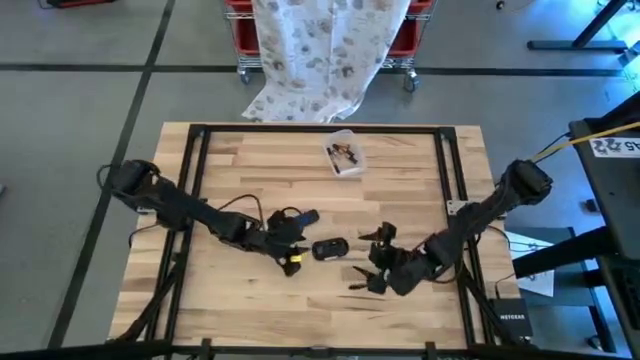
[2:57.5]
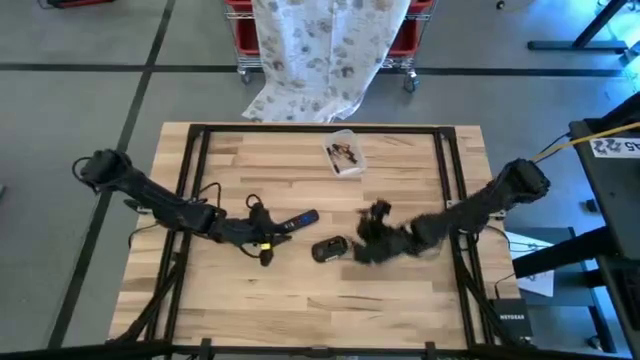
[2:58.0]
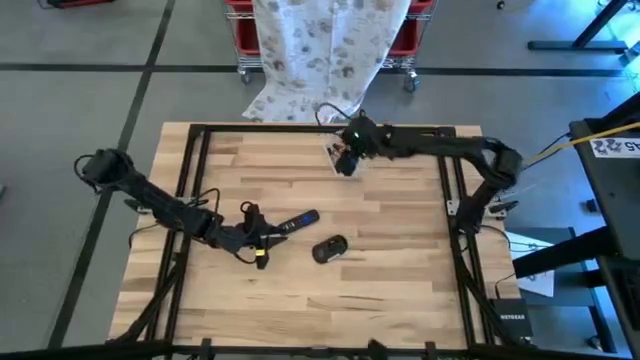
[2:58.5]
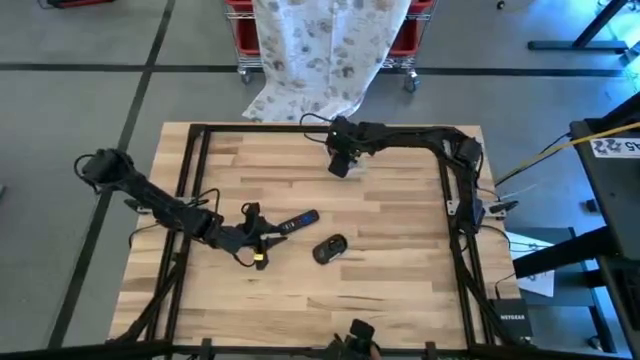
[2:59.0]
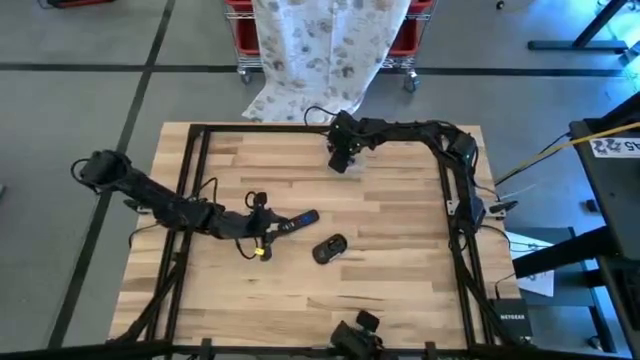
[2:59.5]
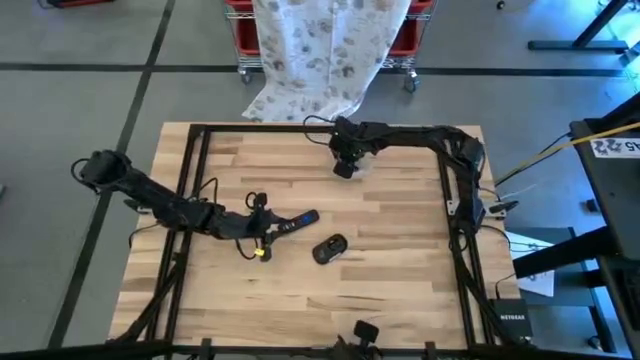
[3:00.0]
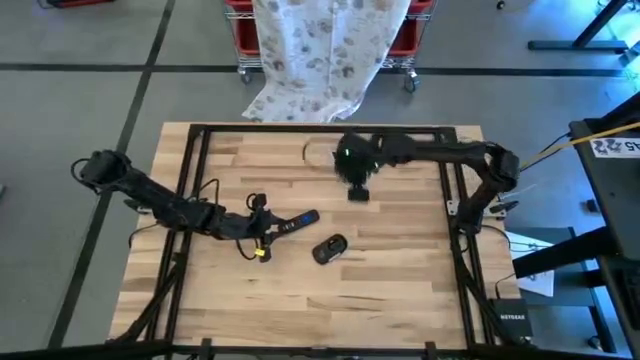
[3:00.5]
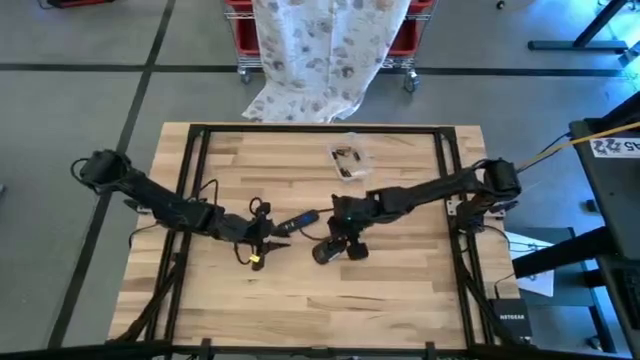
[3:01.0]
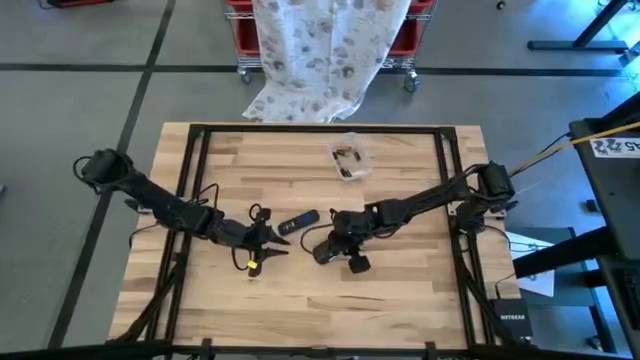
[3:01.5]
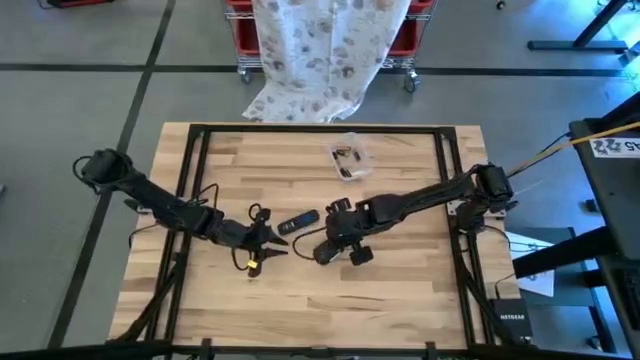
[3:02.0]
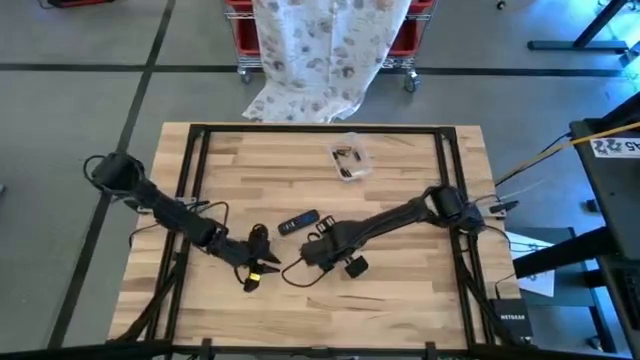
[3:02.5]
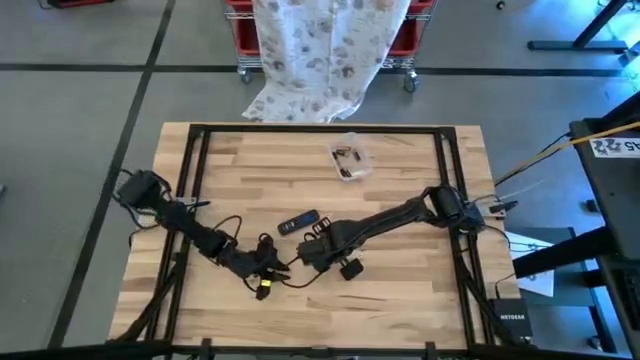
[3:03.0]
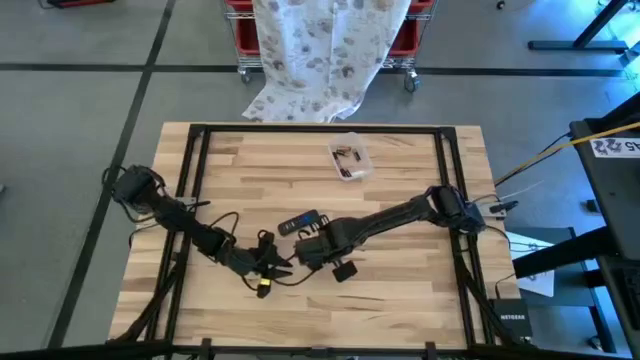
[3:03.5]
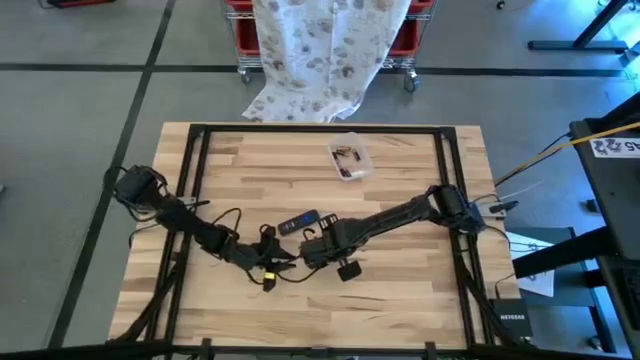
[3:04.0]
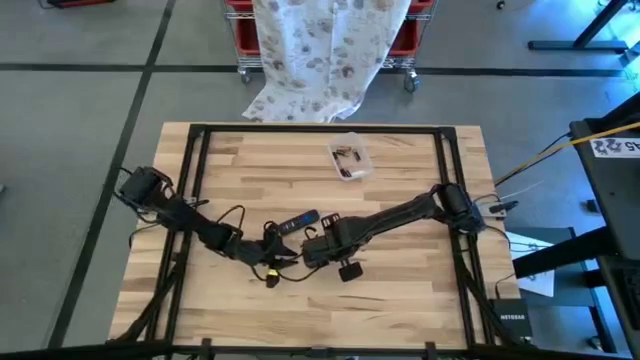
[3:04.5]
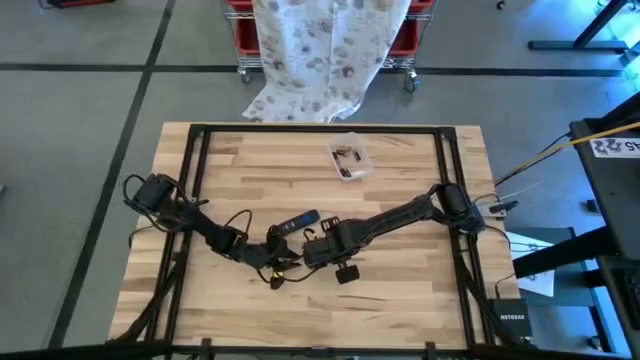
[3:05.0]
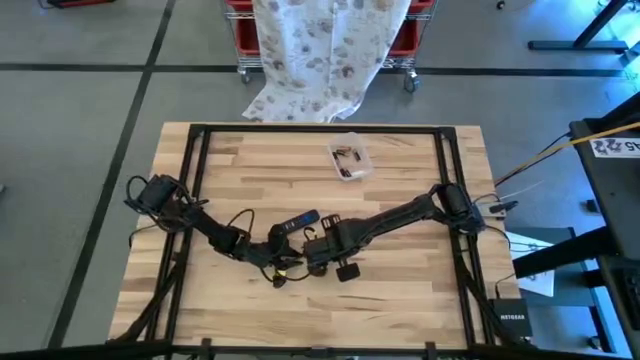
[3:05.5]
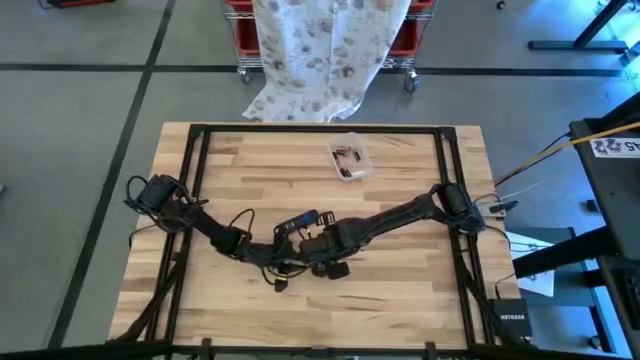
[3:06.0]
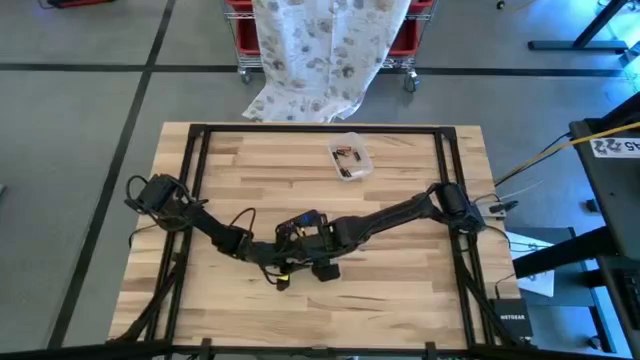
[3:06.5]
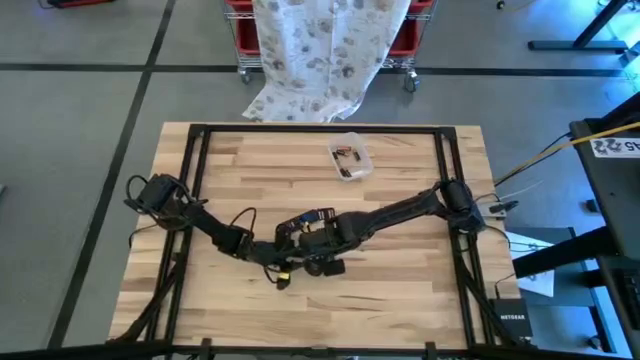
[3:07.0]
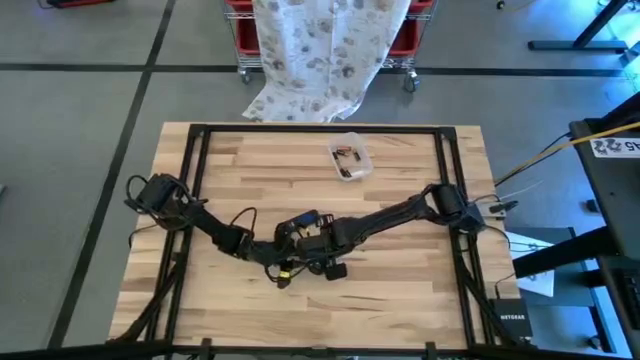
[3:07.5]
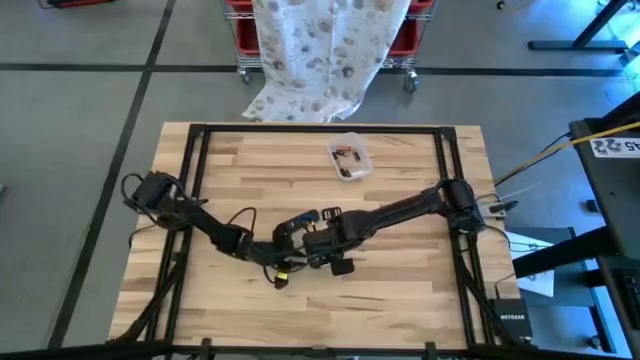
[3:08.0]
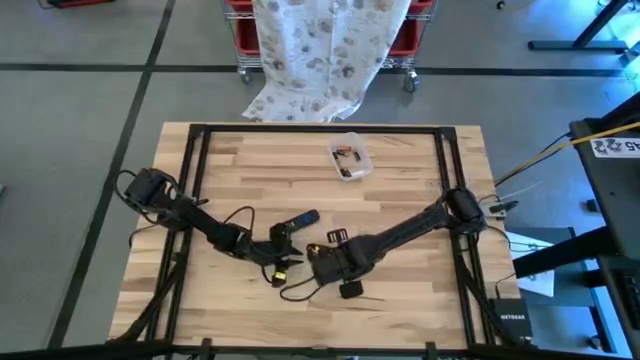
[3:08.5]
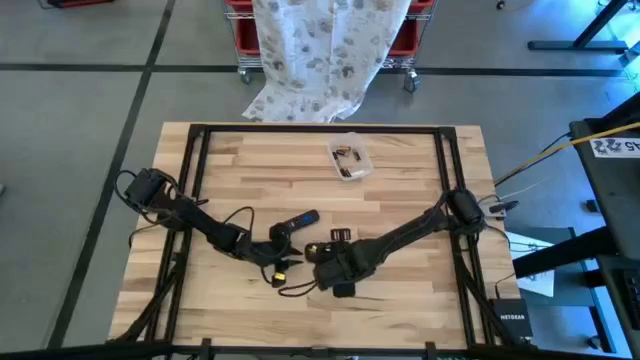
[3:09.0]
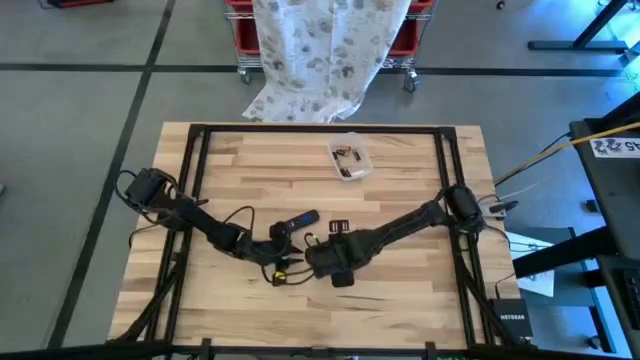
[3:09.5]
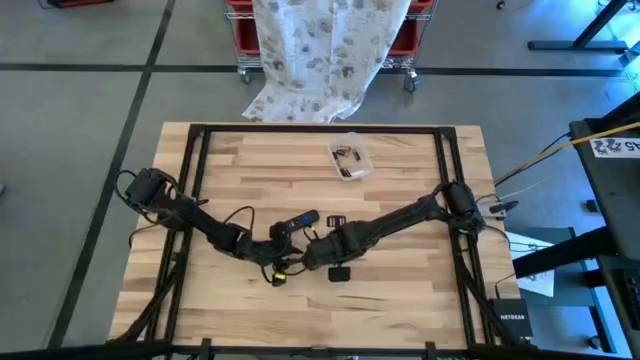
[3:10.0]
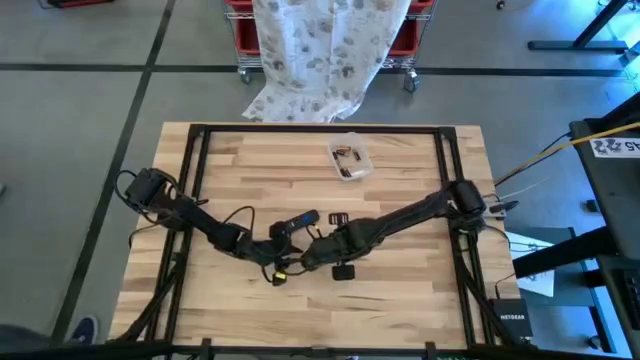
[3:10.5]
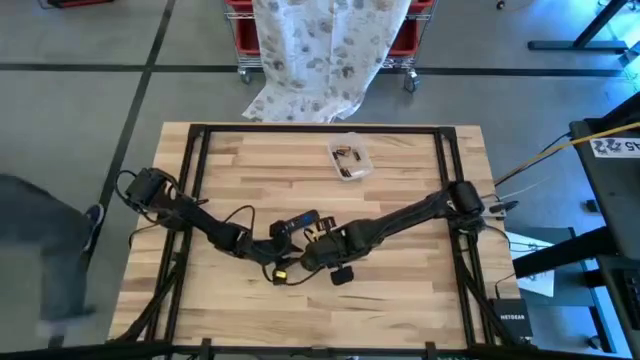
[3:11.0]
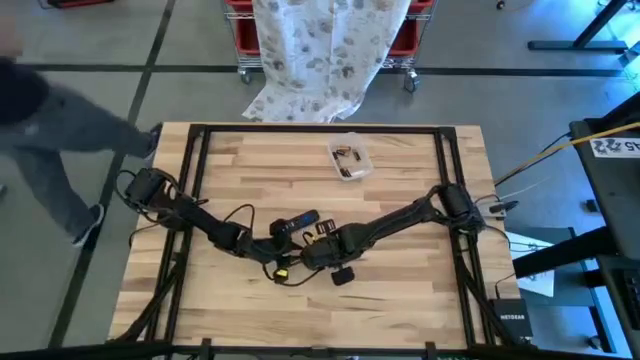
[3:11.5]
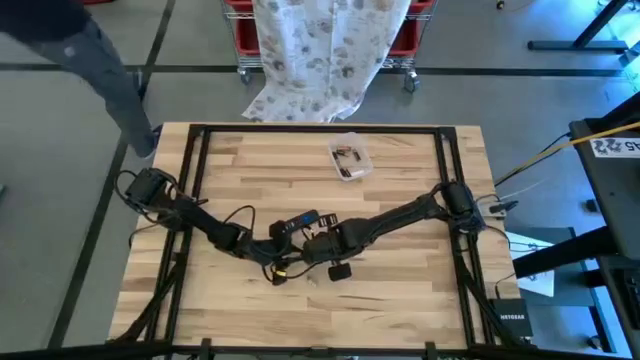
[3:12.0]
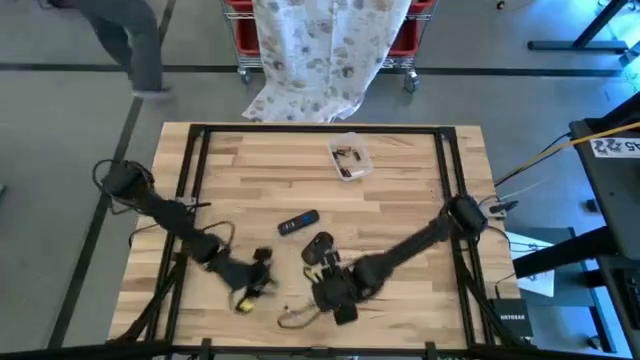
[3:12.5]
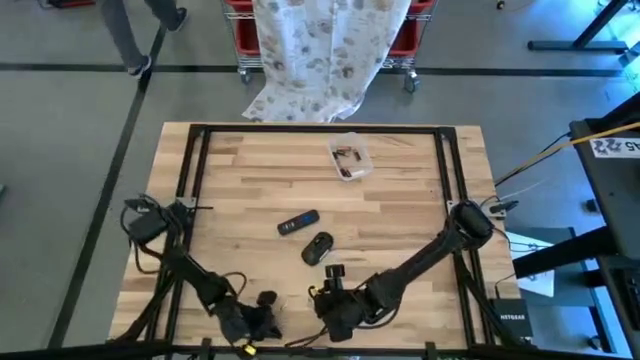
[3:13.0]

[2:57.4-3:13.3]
Task: Insert battery
Insert the white battery into the wireless mouse

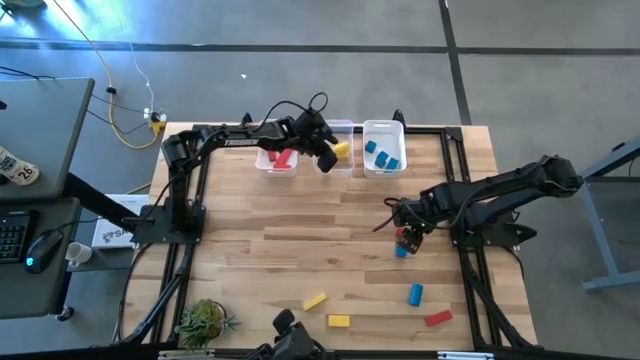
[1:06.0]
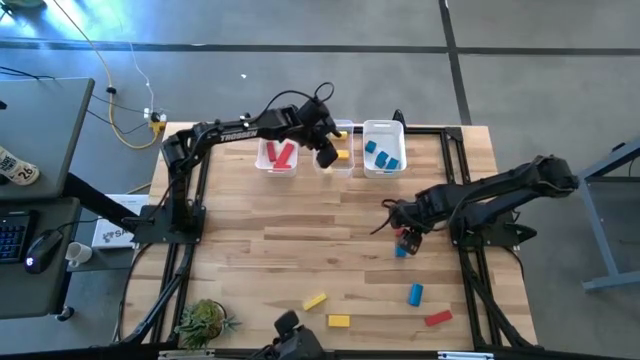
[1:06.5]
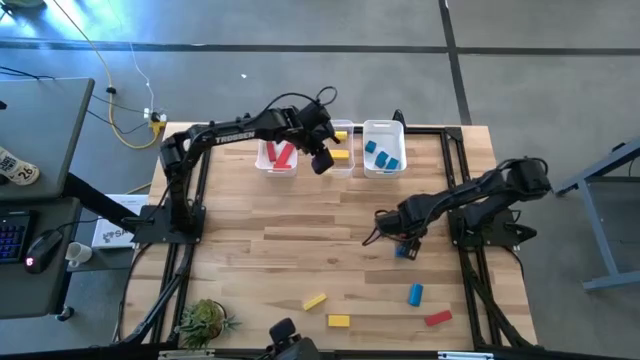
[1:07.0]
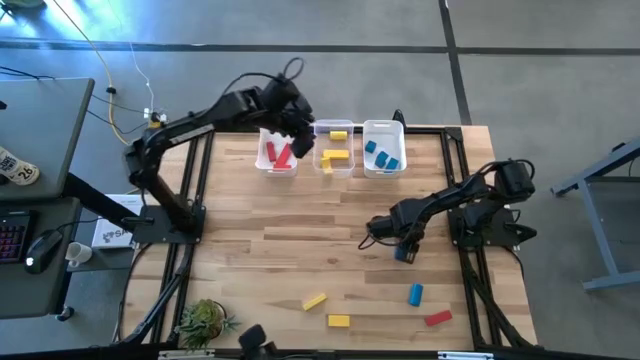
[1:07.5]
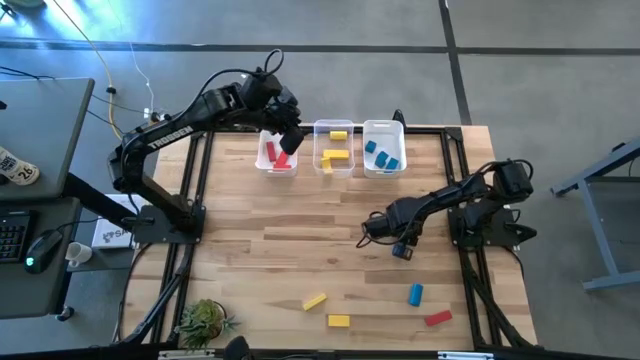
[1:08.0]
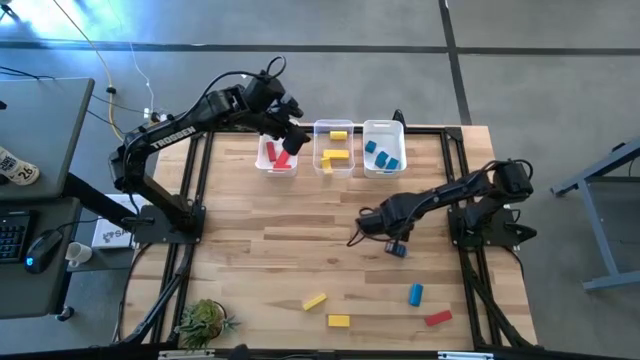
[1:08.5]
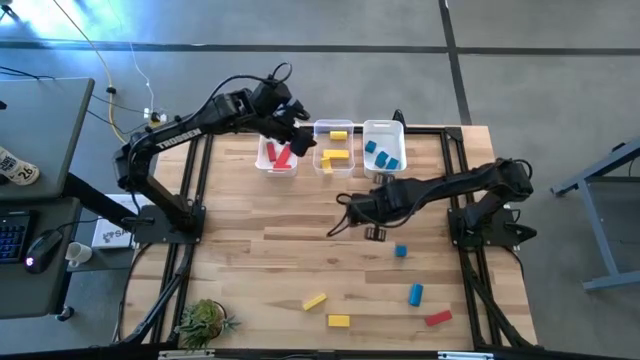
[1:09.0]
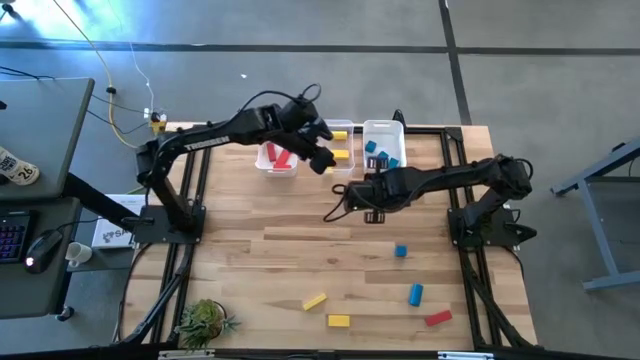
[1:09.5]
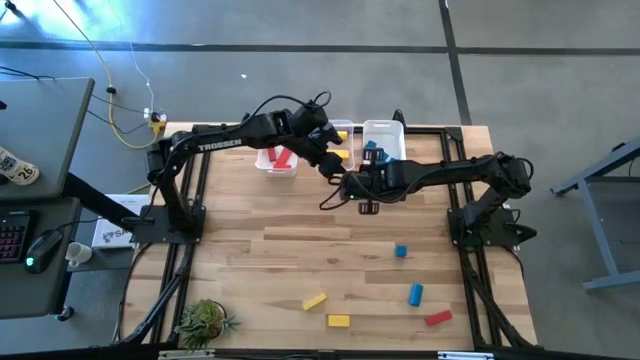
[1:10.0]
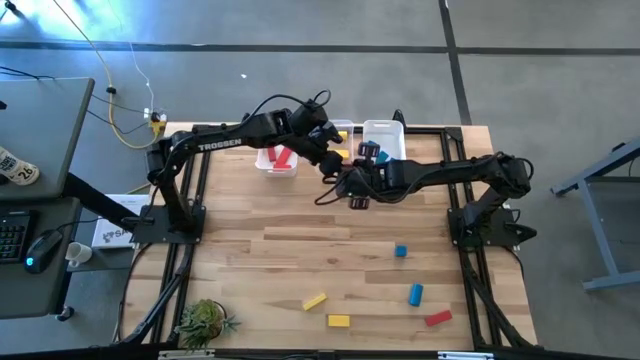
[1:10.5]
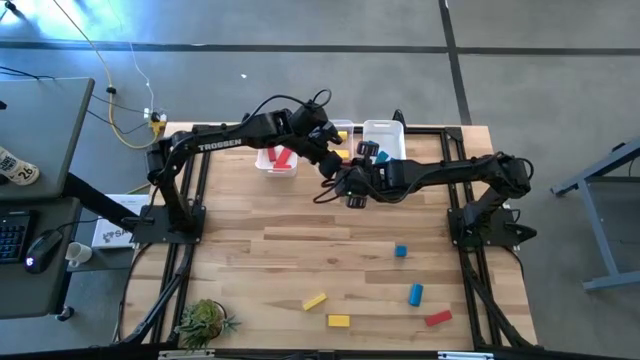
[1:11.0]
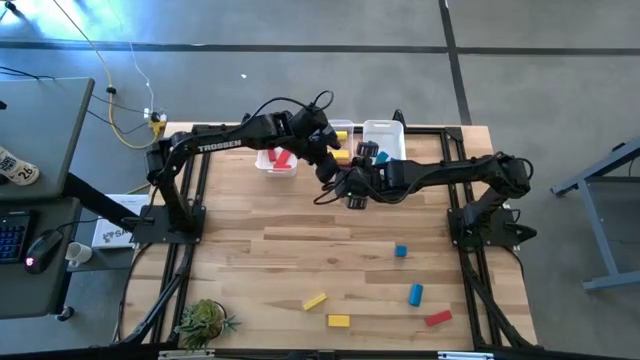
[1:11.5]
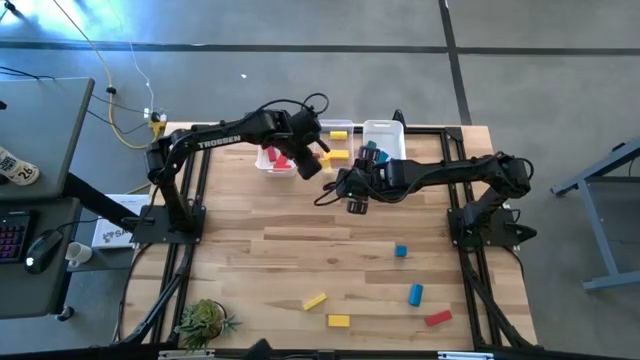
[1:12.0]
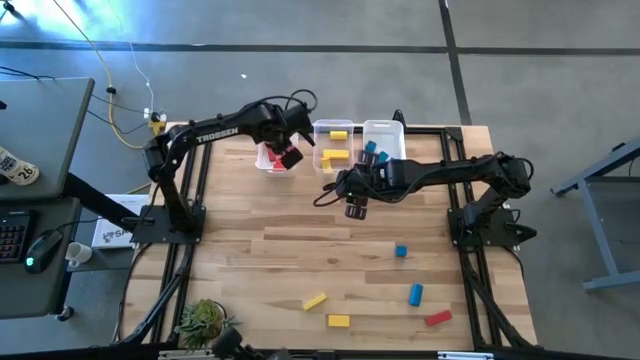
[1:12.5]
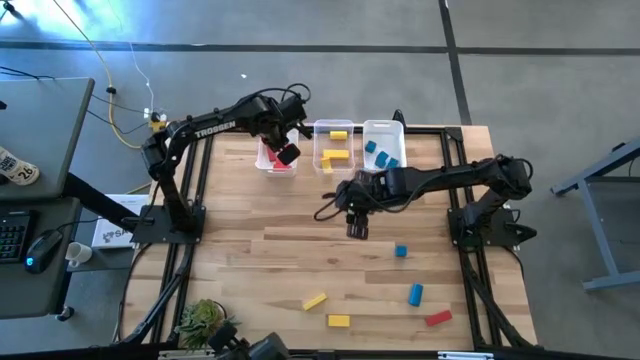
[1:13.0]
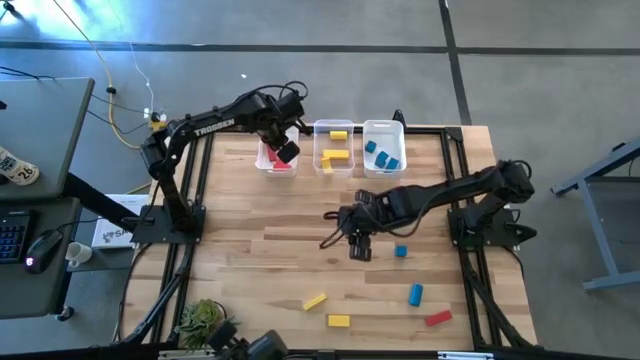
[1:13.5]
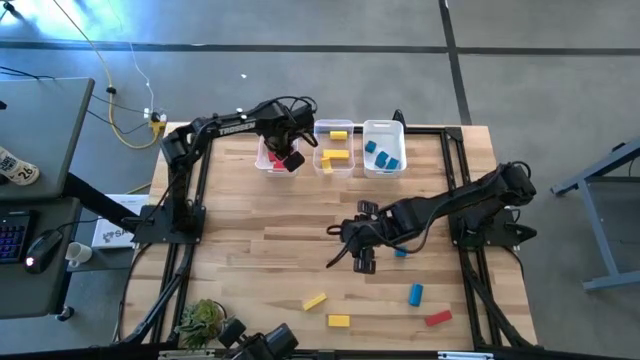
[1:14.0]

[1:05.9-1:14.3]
Task: Sort & place blocks by color
Put the red block into the left white bin
